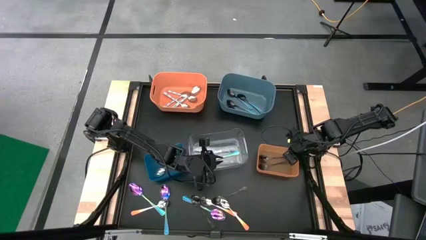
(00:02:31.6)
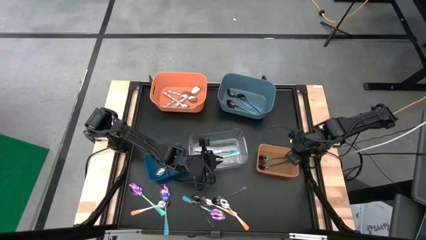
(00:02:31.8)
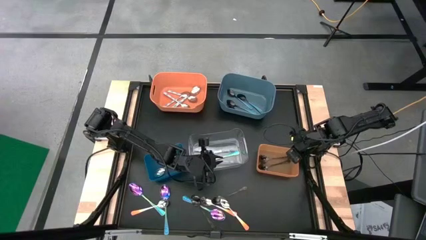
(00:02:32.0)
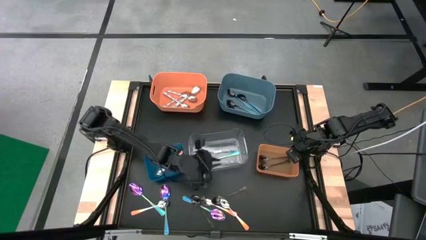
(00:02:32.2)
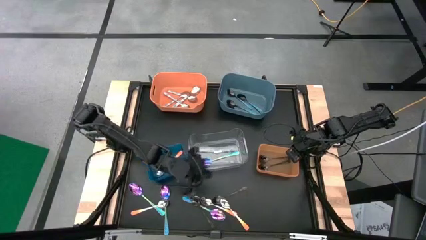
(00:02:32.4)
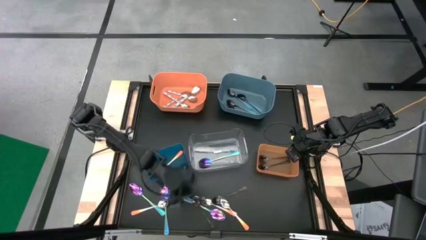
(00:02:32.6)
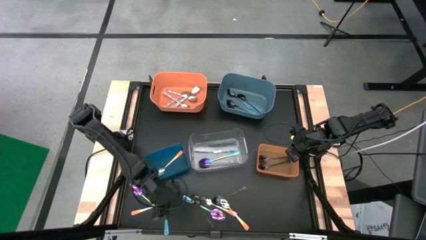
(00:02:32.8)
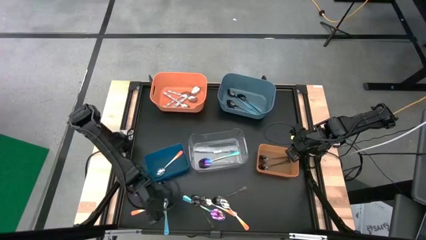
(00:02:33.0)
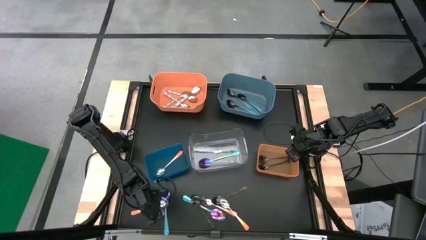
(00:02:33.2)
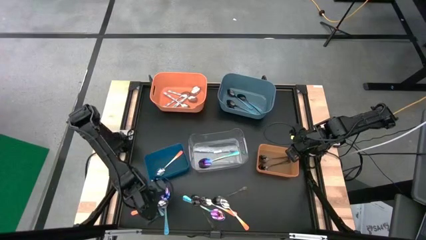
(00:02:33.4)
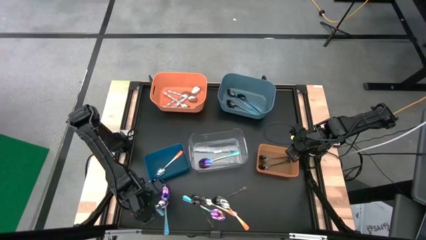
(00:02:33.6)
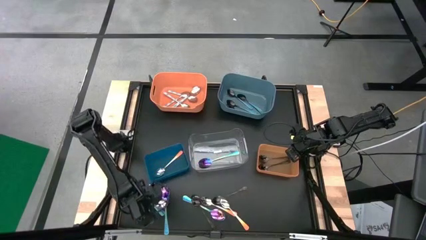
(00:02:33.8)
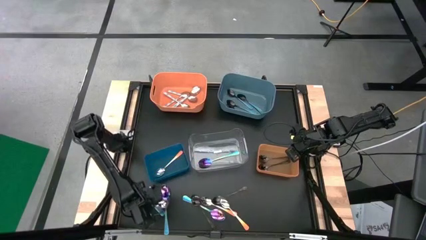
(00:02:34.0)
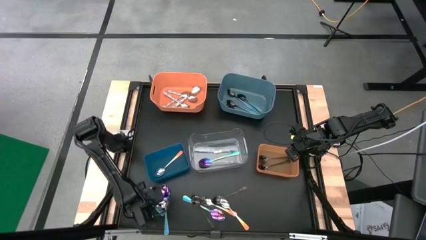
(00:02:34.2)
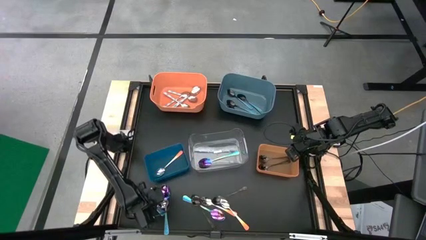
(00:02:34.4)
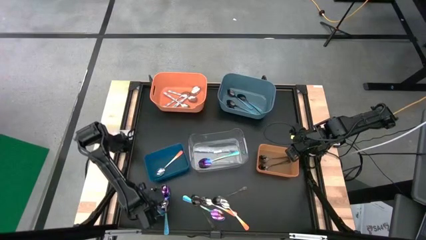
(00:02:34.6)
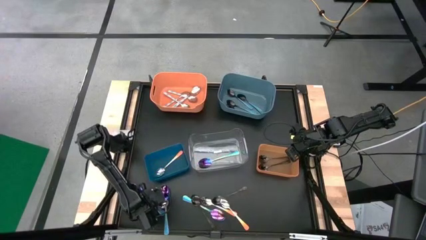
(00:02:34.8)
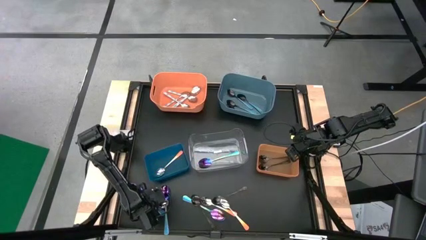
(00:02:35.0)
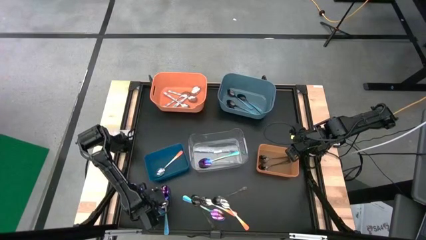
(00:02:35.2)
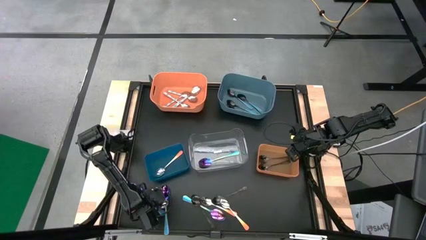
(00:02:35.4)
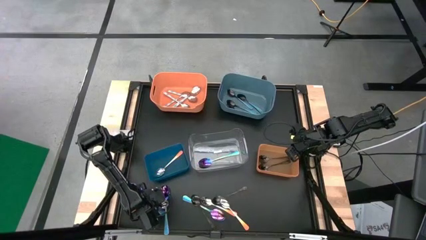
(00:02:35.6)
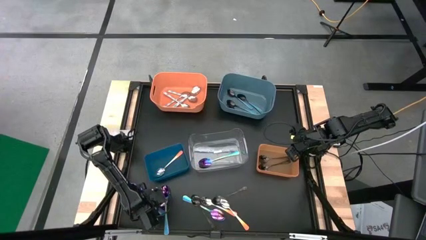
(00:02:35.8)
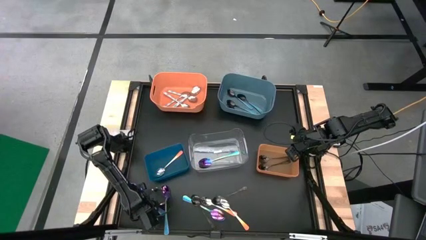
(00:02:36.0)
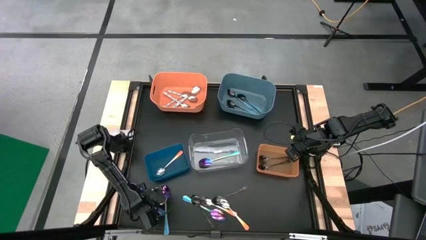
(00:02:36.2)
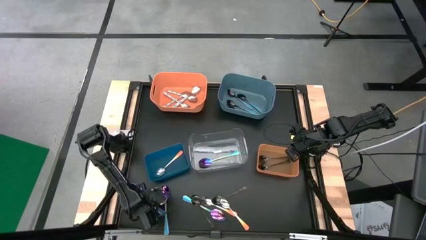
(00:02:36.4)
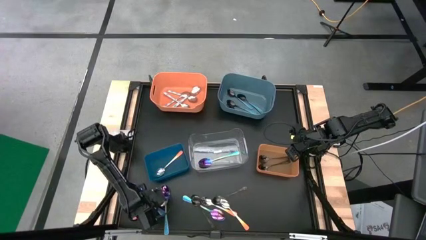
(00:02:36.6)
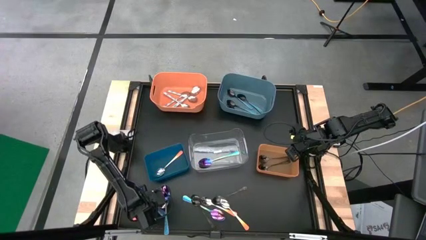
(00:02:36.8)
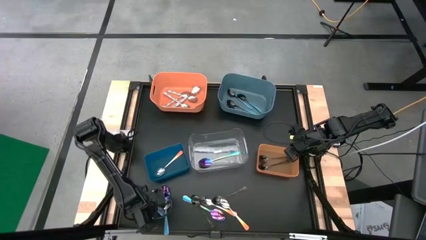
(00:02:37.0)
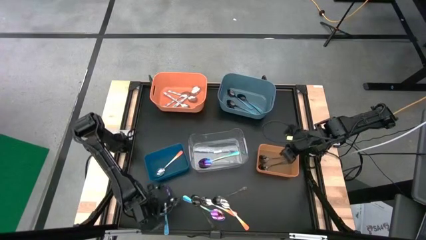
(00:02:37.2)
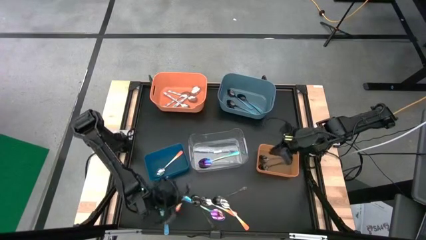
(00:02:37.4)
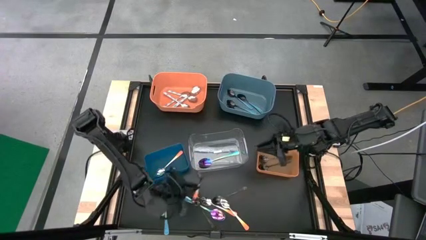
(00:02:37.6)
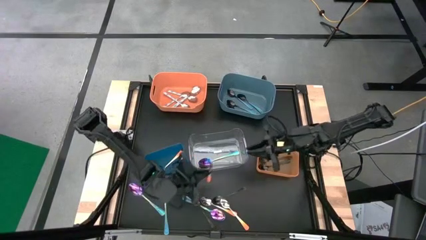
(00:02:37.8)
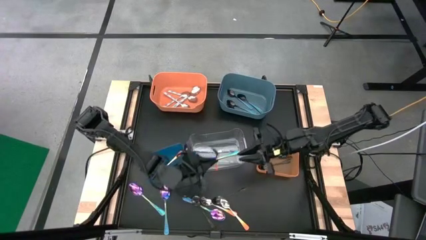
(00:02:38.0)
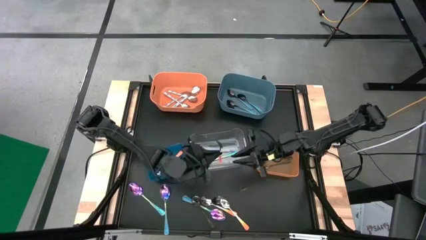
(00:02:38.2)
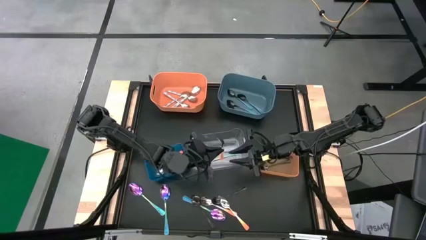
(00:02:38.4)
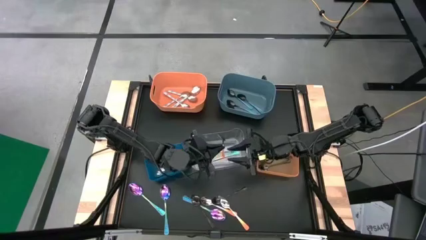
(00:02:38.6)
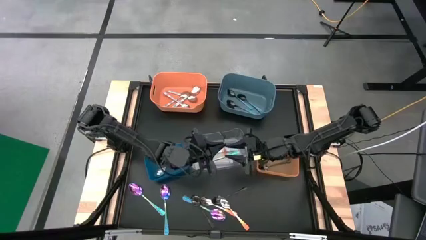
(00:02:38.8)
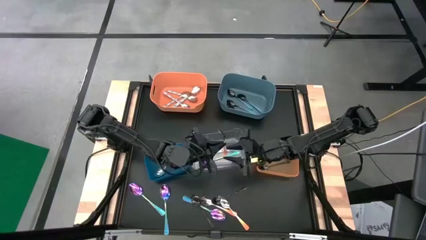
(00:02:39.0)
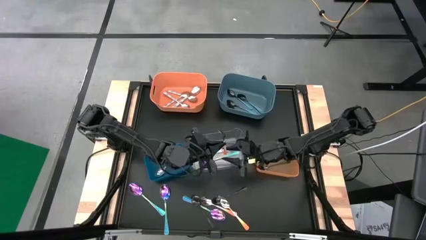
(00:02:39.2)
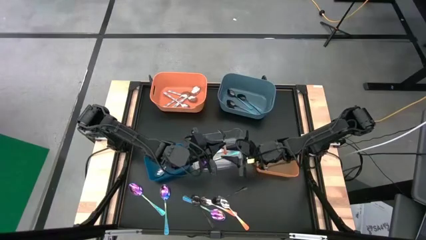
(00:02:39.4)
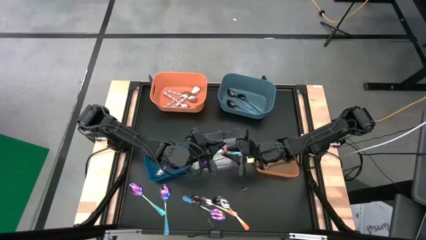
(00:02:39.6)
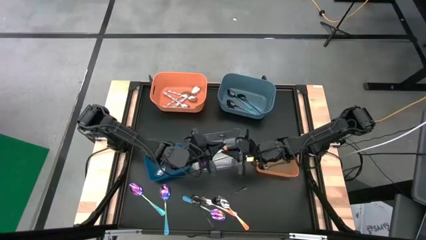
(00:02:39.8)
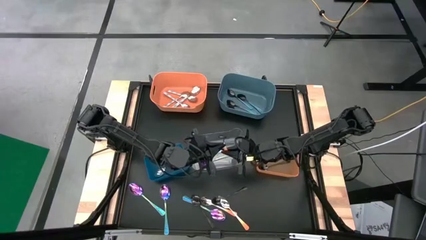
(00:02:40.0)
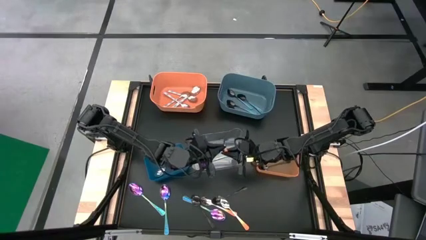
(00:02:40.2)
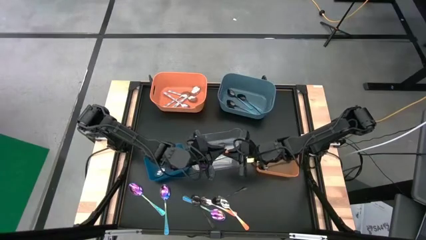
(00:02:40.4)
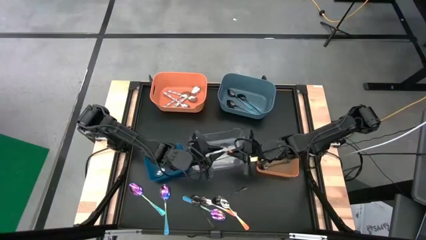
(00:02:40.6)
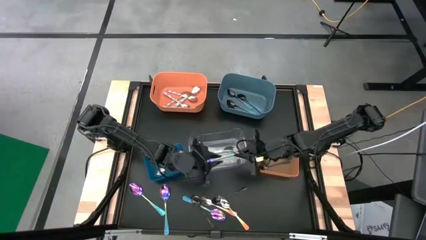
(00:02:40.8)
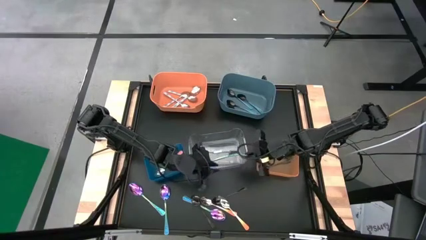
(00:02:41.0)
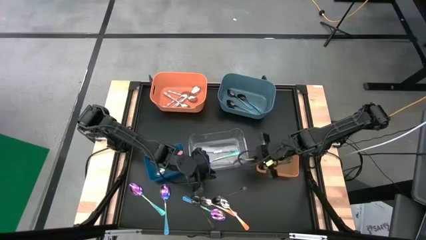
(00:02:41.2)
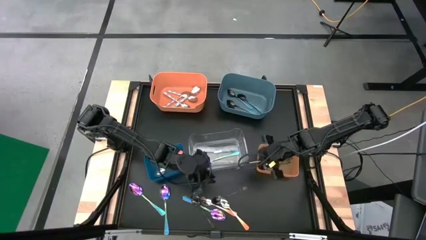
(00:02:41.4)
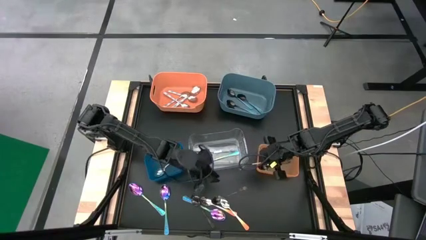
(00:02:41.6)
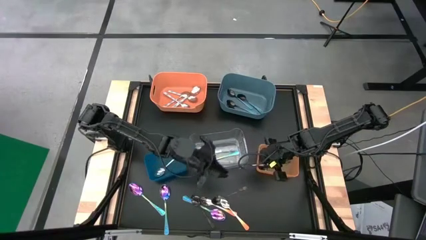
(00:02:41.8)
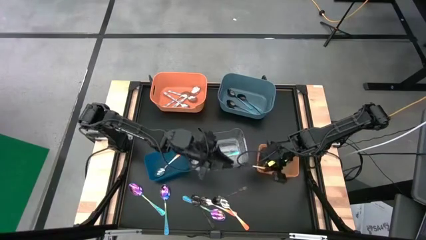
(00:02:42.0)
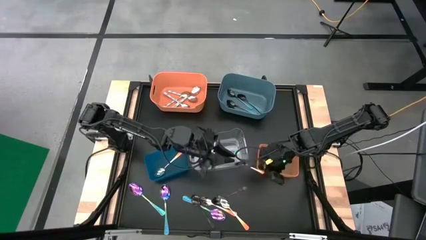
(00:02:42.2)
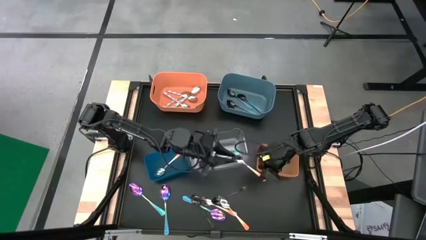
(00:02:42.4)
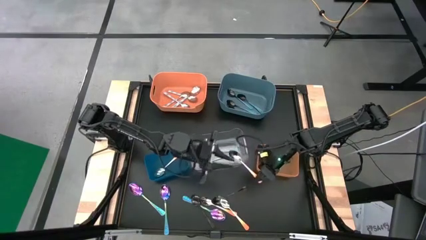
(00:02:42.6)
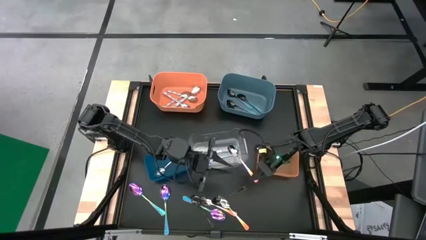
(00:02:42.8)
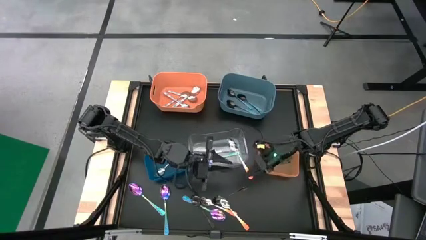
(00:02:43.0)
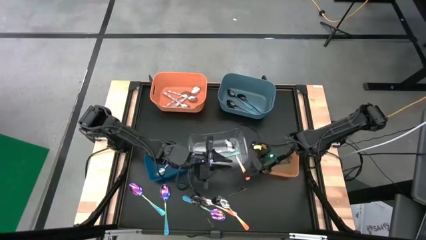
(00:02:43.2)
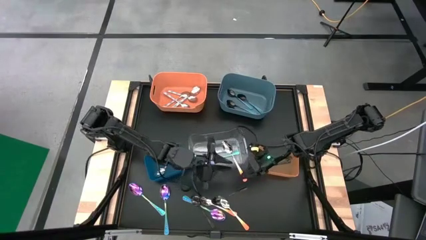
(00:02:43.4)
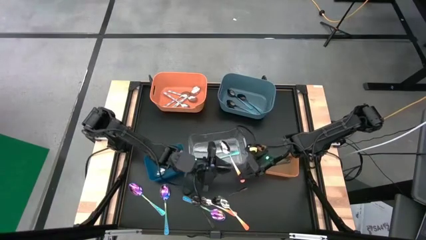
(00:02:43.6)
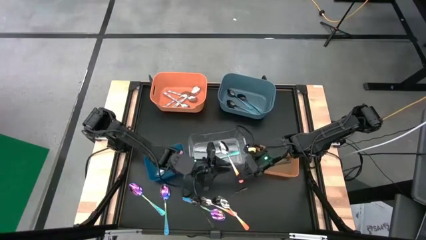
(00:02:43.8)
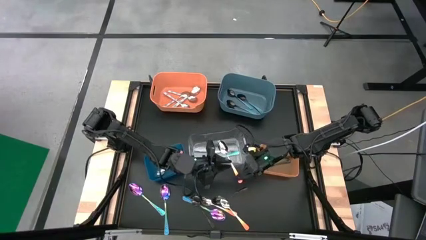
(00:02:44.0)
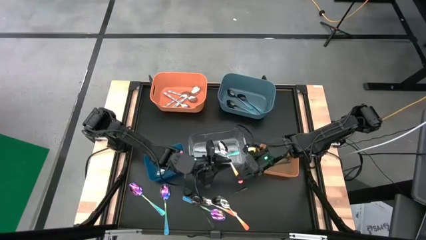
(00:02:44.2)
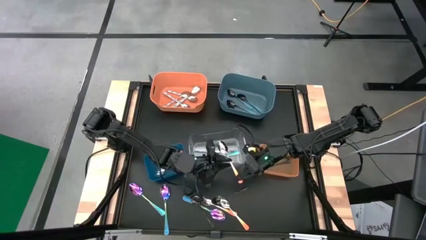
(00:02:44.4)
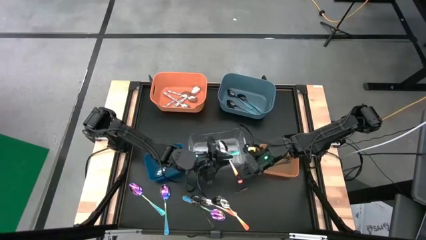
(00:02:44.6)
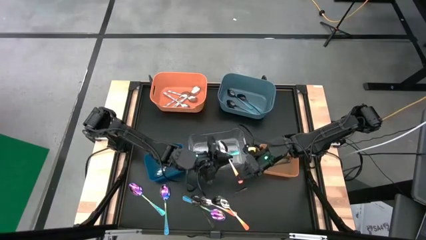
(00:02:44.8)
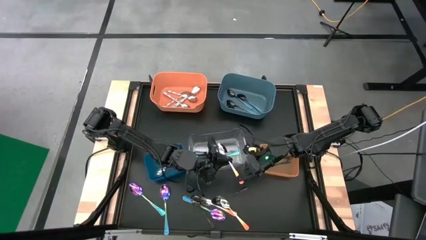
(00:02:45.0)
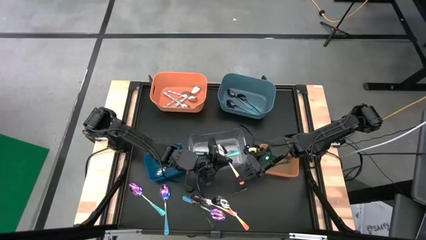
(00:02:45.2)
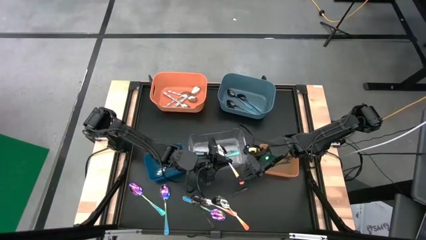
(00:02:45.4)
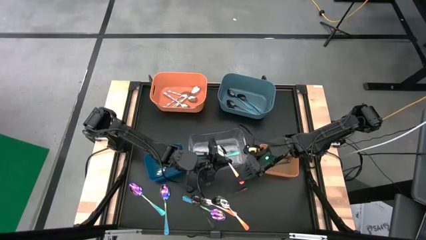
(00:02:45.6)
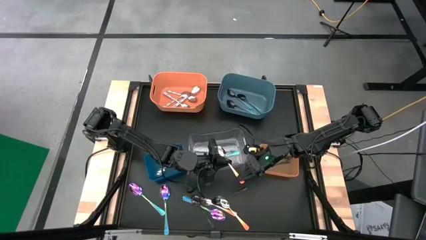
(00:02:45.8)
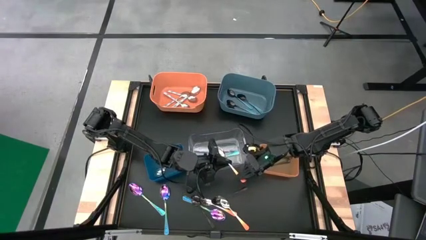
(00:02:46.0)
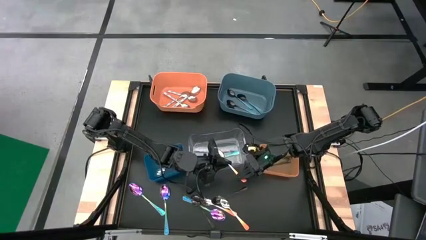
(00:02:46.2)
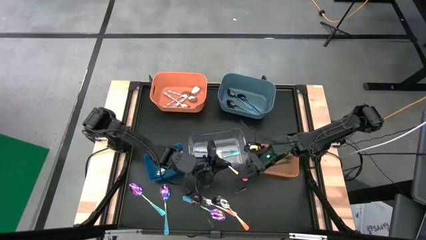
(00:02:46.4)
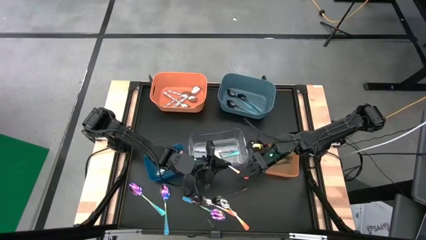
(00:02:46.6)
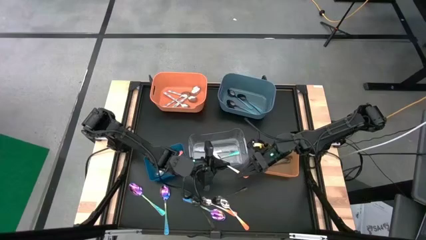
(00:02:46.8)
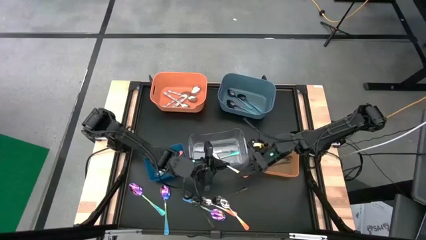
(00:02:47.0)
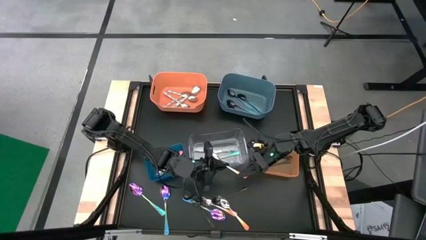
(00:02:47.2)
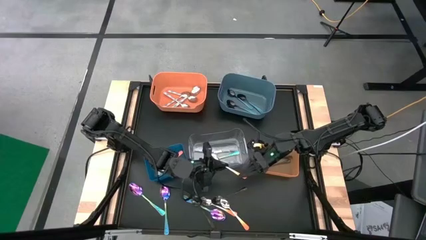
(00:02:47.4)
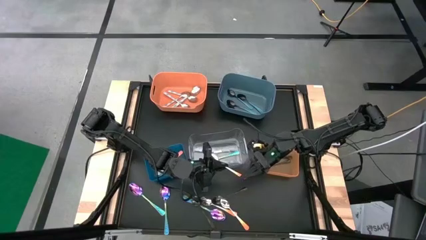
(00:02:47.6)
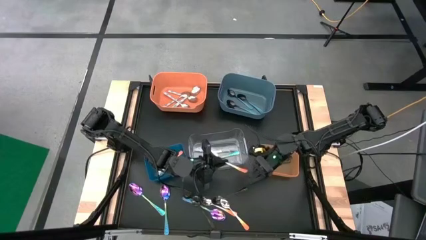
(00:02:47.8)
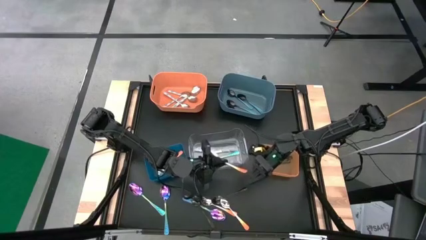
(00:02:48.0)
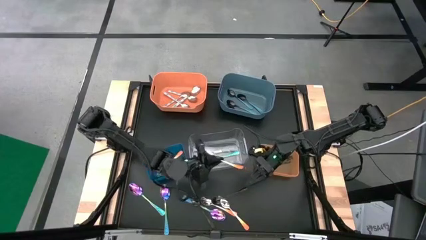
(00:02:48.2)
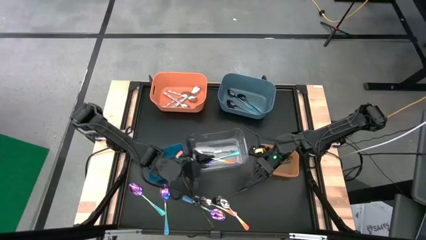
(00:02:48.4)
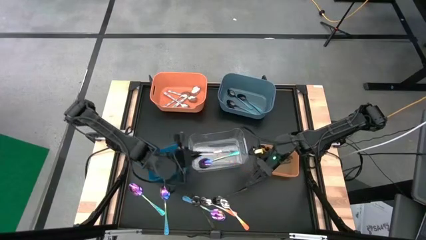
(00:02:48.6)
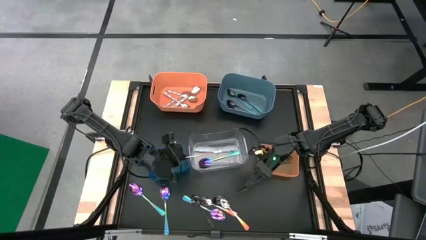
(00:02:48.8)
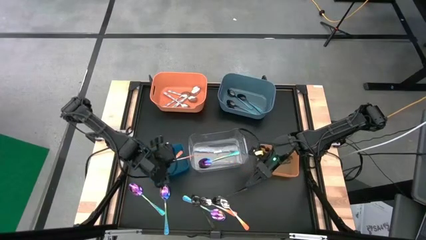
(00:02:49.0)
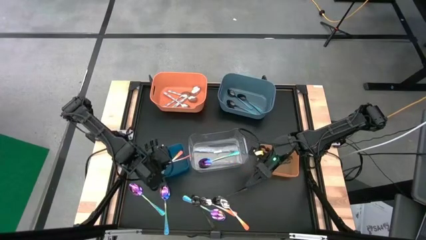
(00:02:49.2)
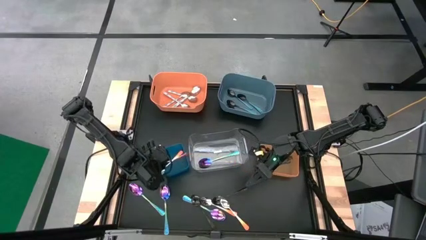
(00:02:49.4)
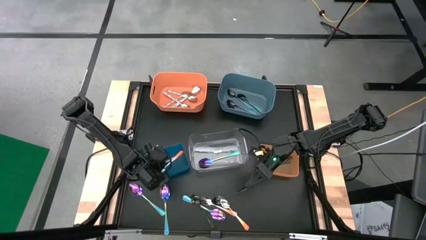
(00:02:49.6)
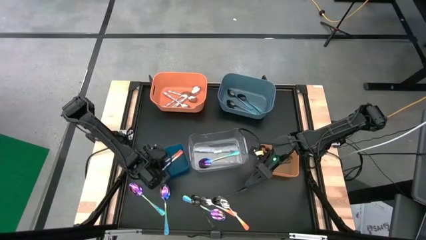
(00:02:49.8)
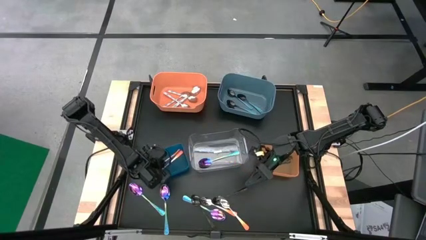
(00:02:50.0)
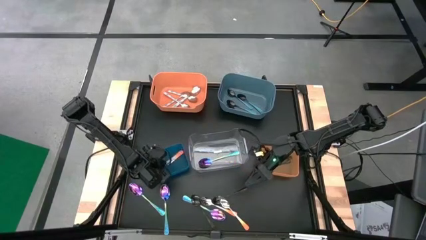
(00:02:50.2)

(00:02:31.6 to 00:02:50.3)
Task: Sort silverware by color (type)
Put the orange spoon into the blue bin
